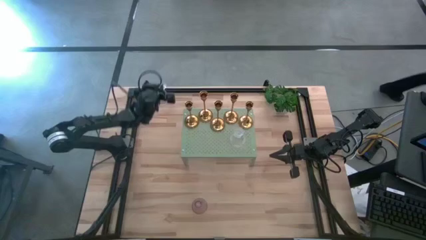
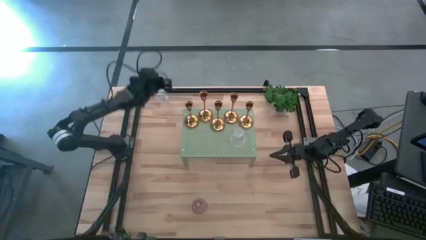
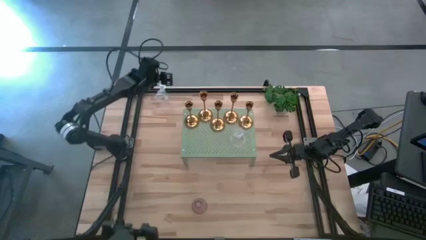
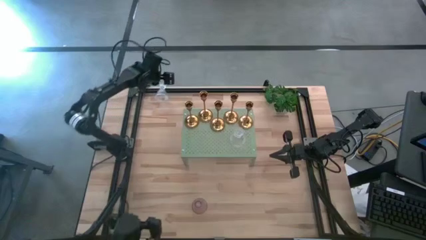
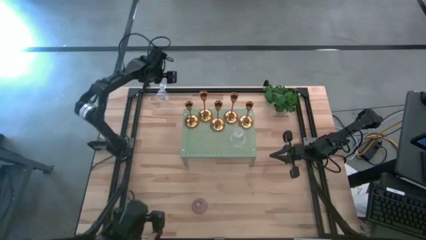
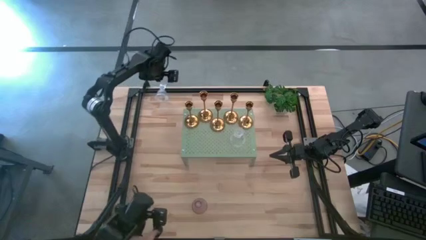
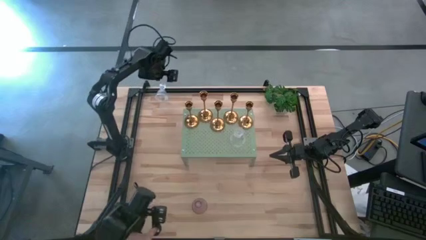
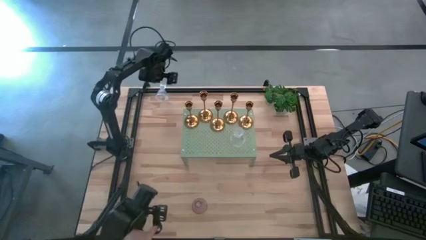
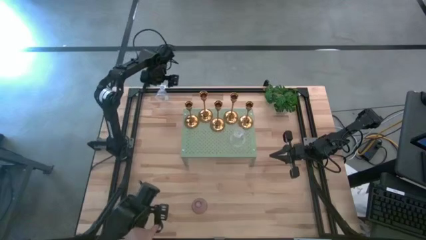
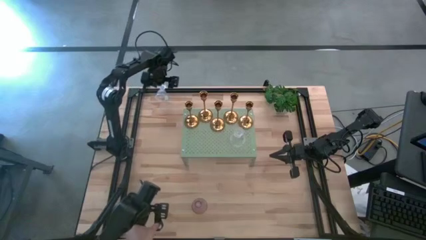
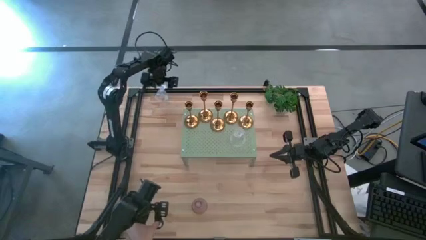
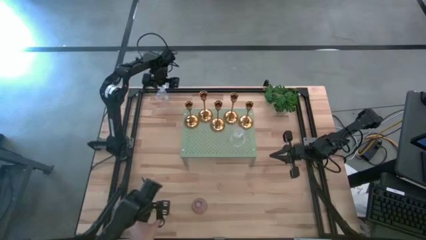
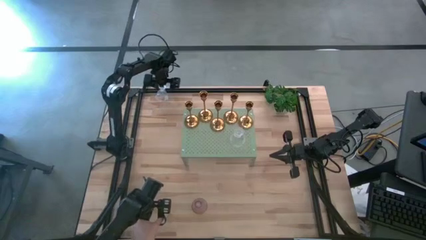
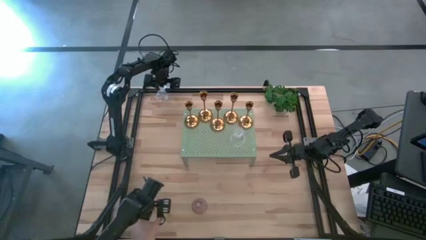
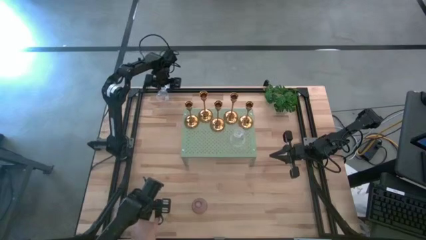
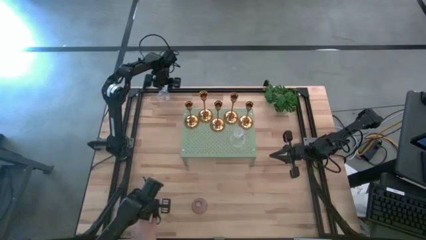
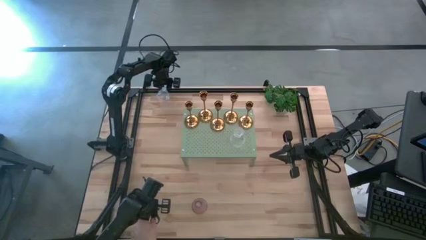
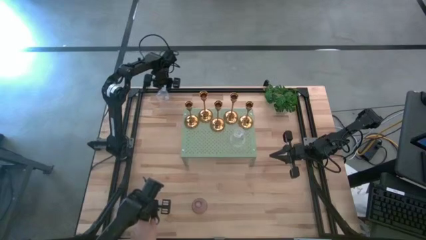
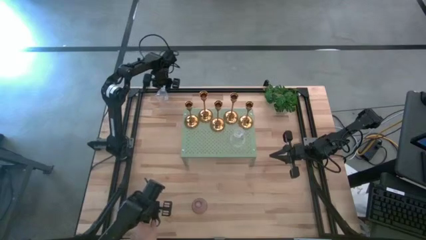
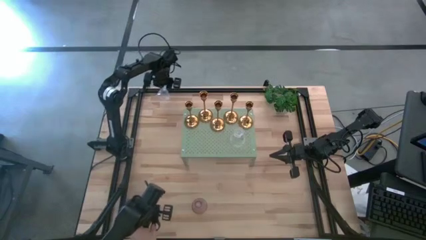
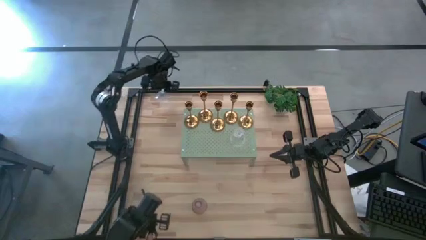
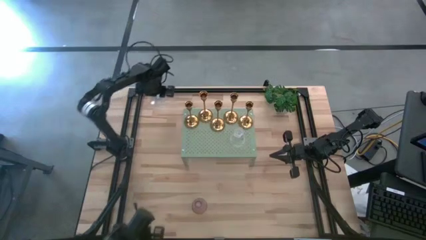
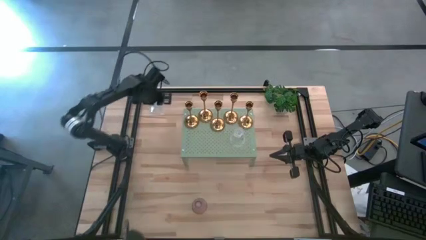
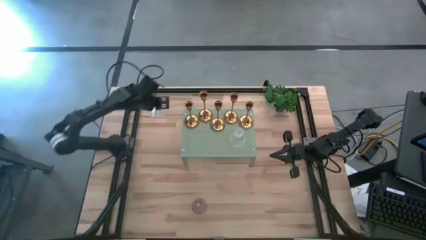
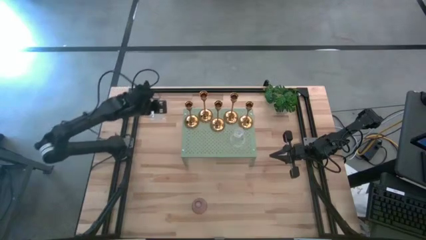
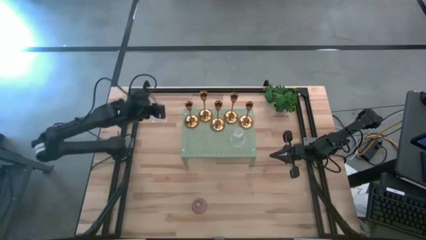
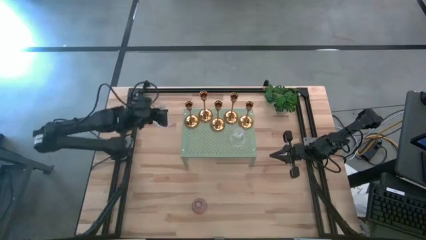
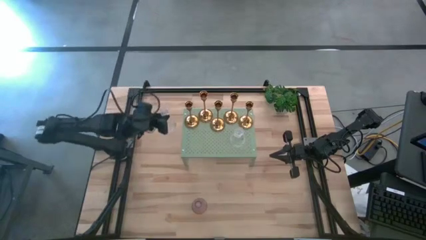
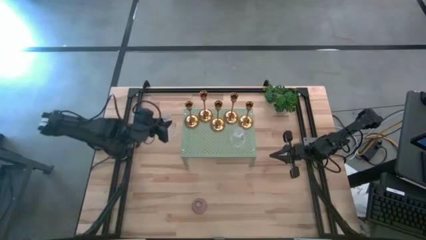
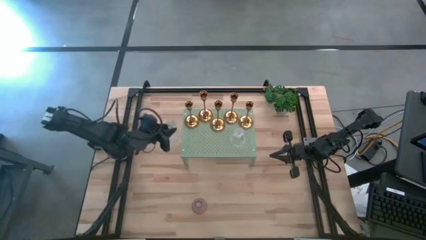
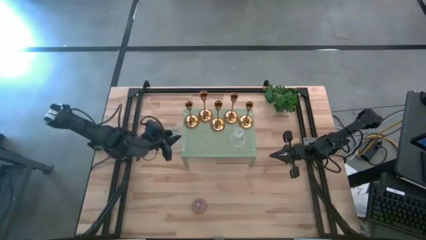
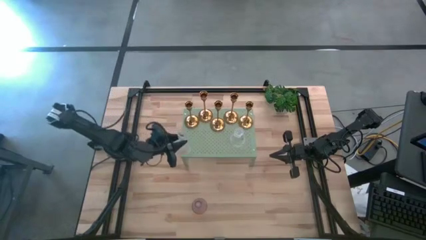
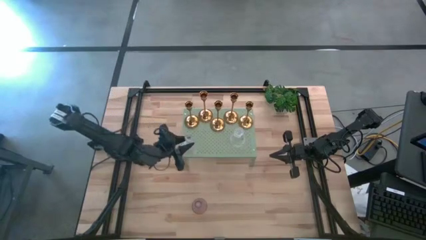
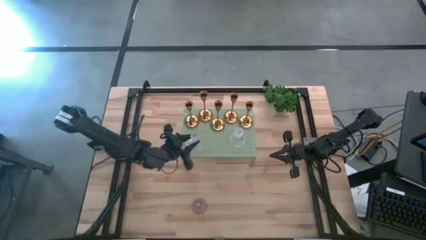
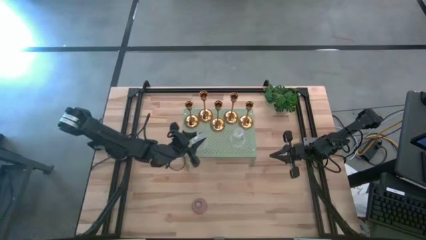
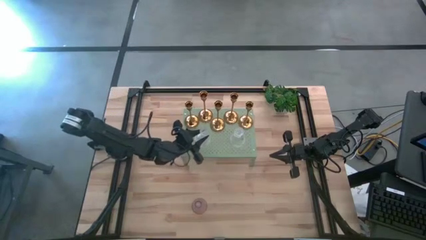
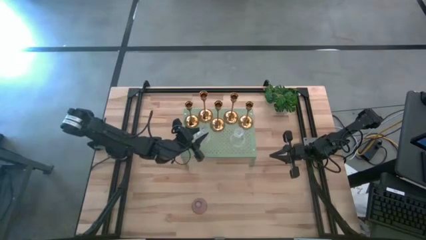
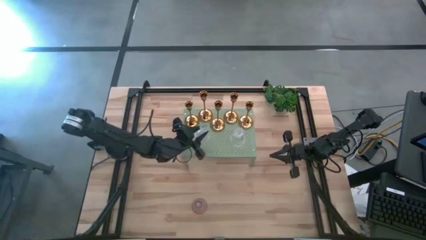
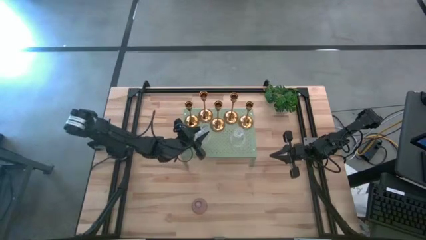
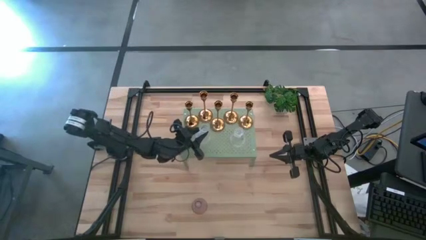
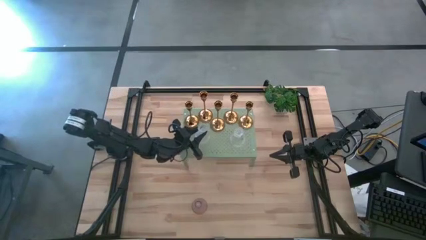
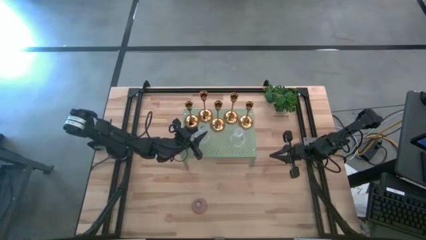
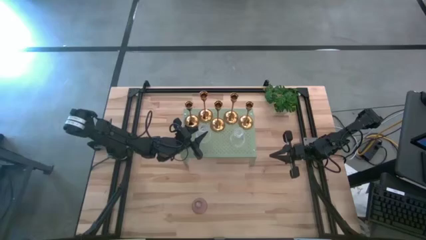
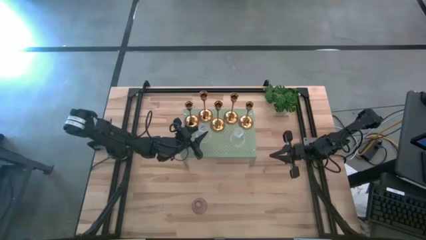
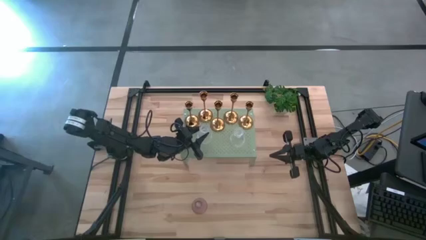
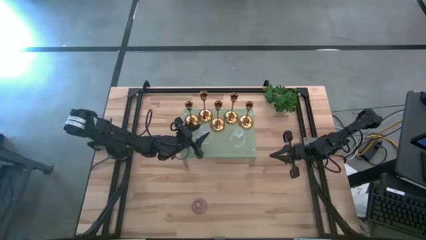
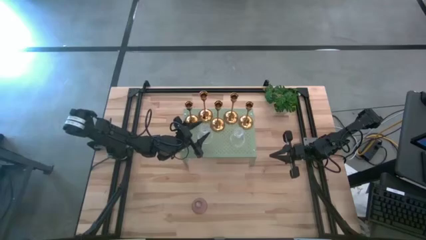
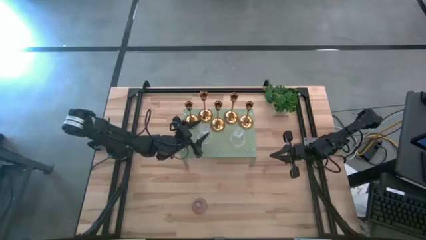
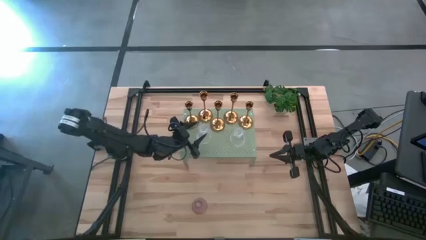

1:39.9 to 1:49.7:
Task: Pick & Place candle stick holders
Put the white crystal glass candle holder on the shelf

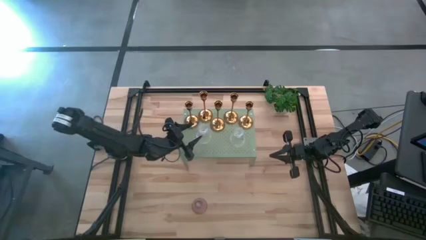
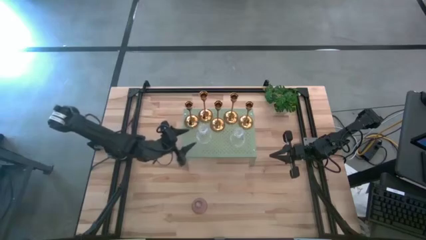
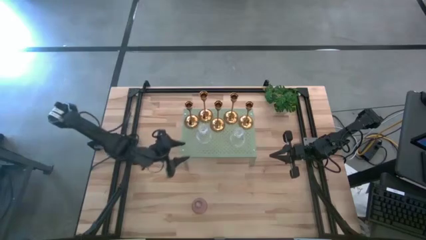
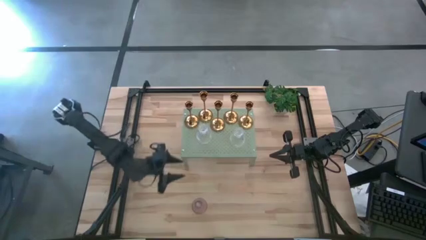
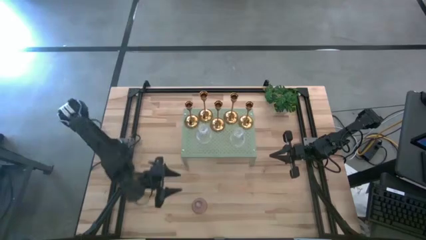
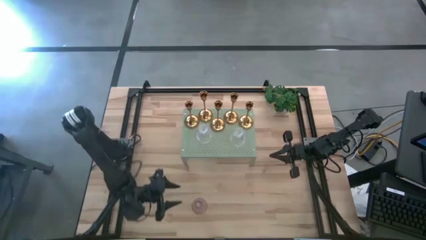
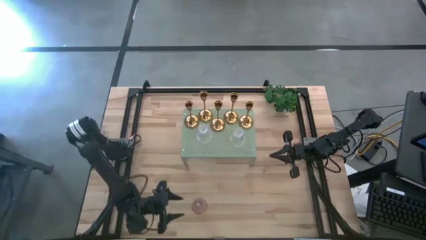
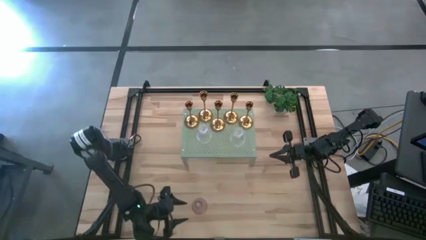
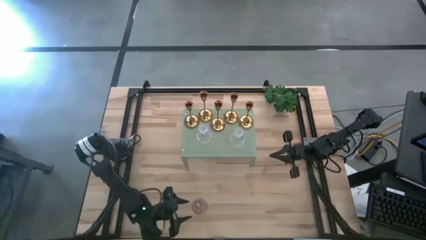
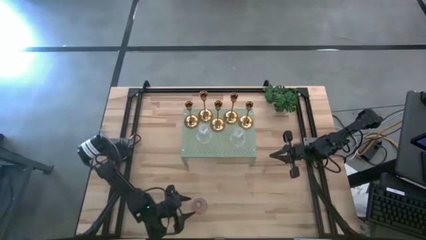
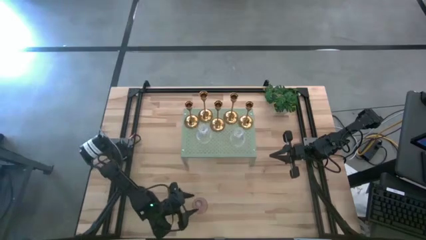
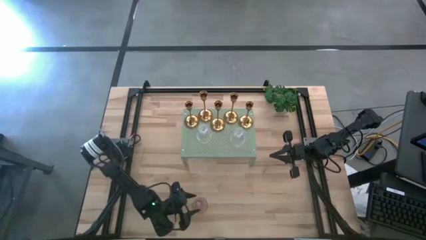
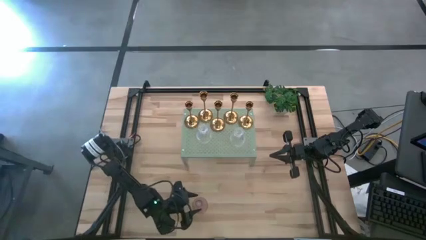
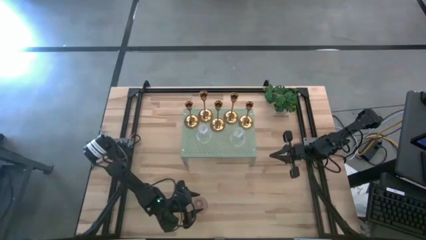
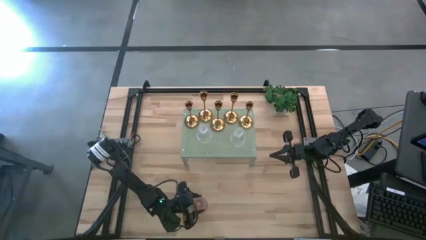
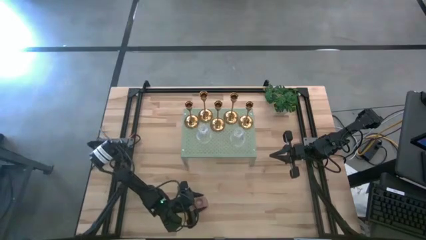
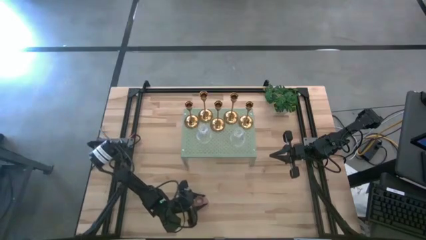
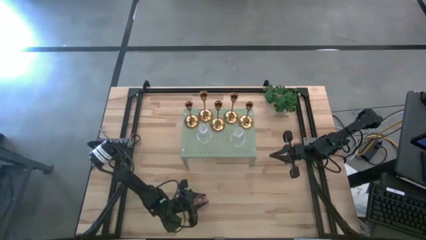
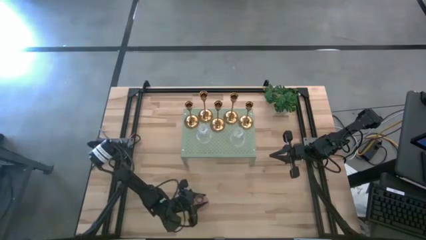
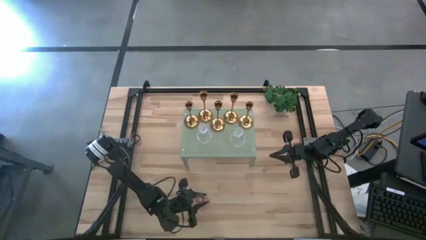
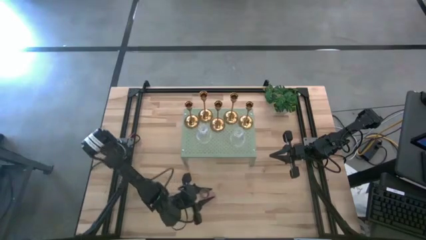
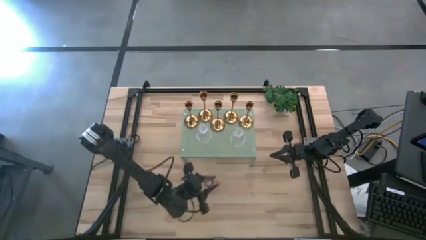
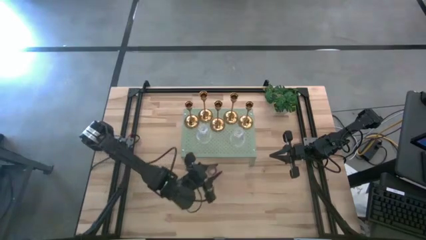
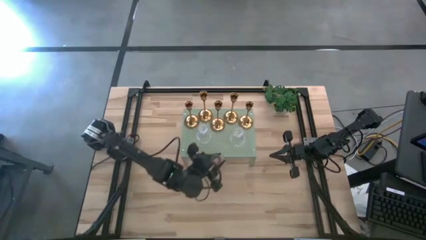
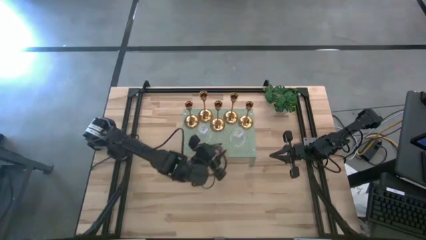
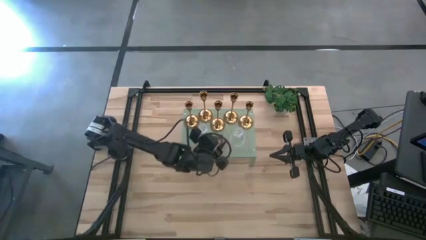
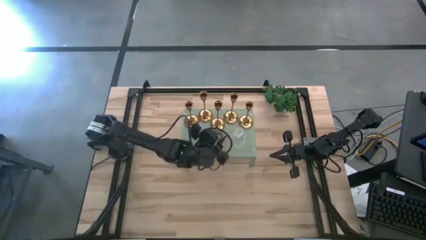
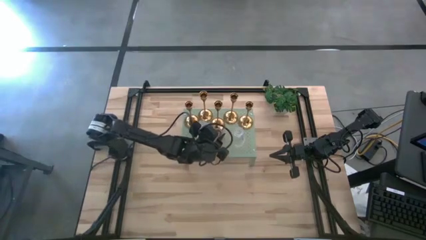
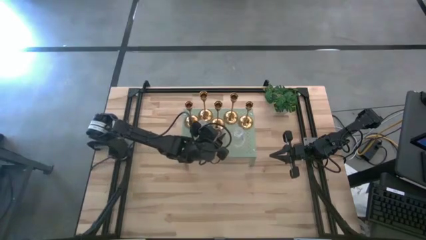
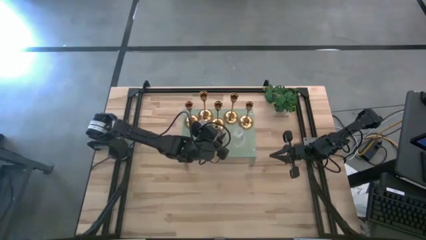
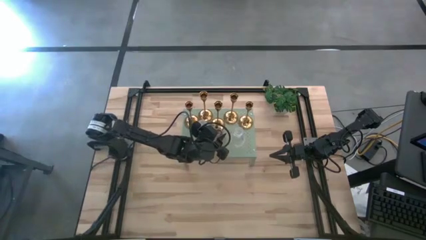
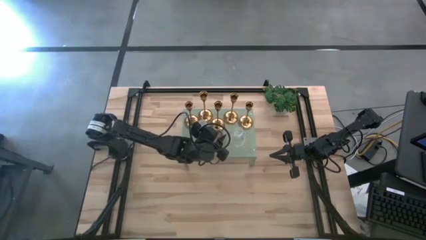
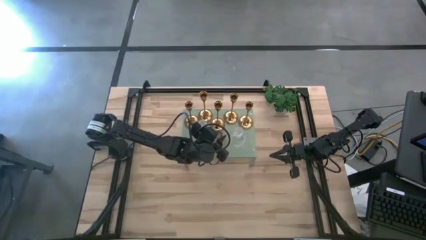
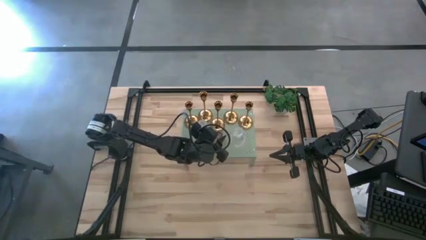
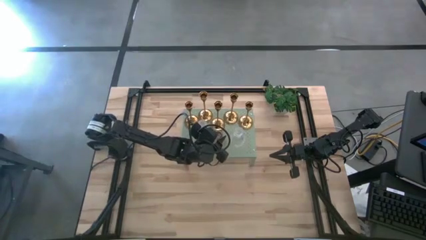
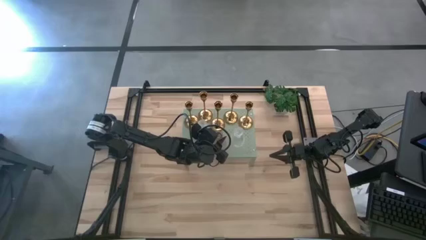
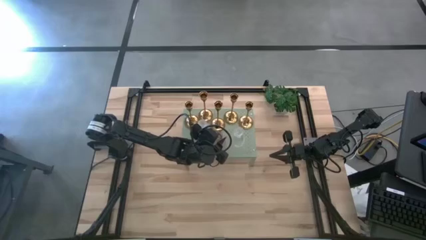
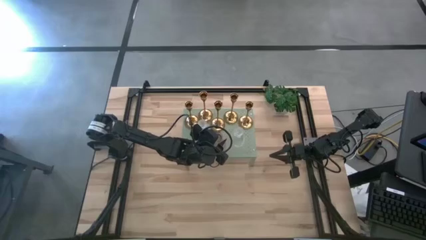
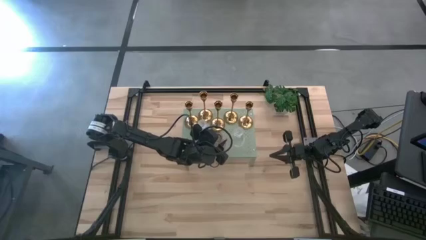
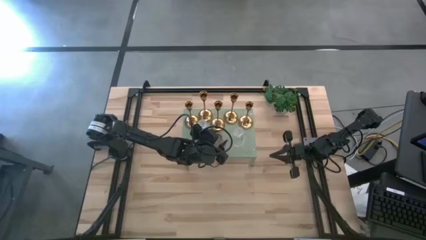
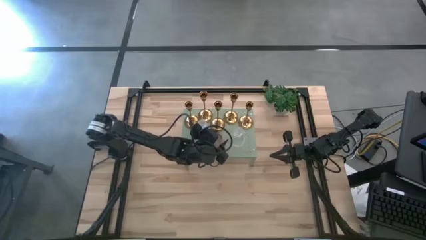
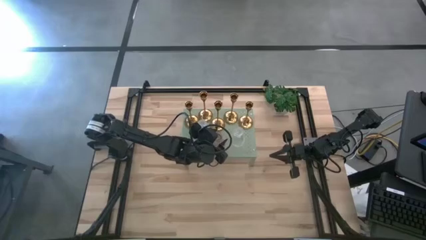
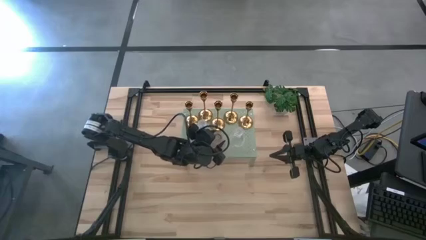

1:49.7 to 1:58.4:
Put the pink crystal glass candle holder on the shelf
